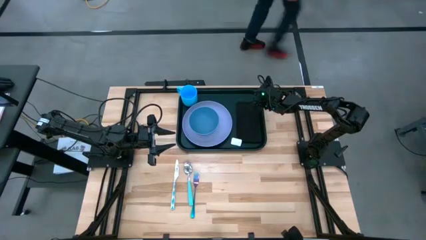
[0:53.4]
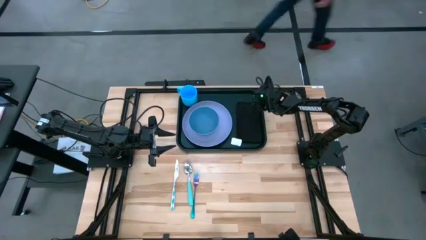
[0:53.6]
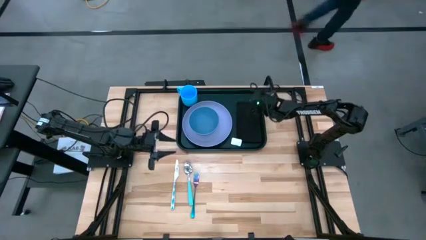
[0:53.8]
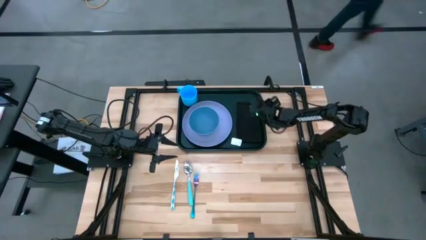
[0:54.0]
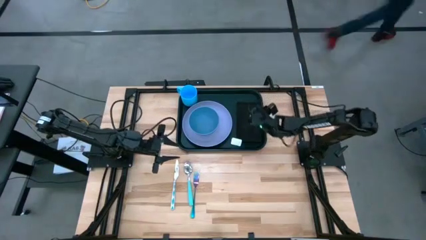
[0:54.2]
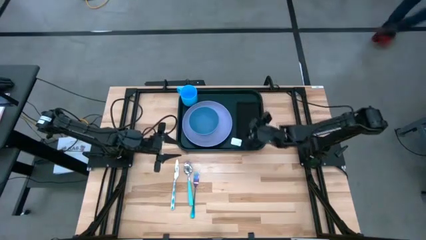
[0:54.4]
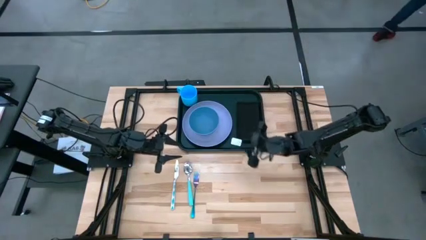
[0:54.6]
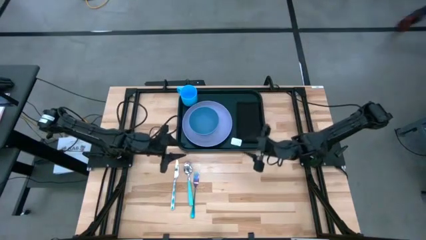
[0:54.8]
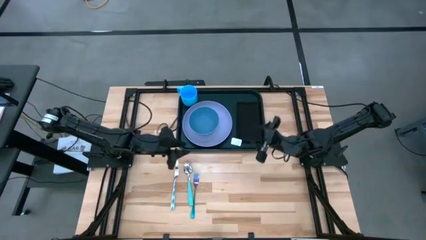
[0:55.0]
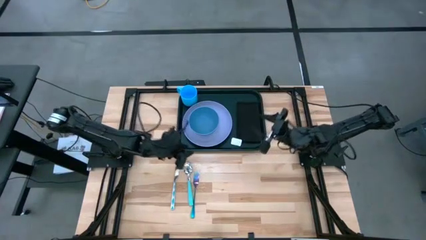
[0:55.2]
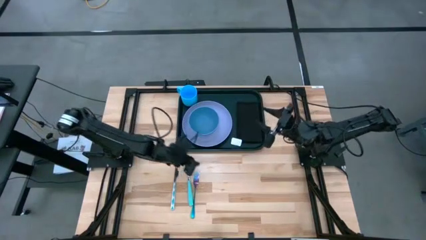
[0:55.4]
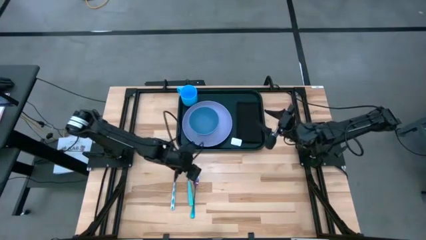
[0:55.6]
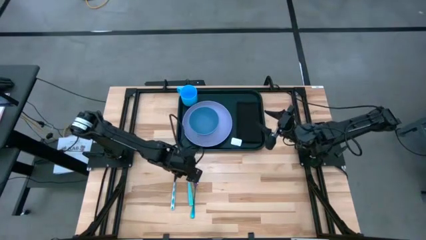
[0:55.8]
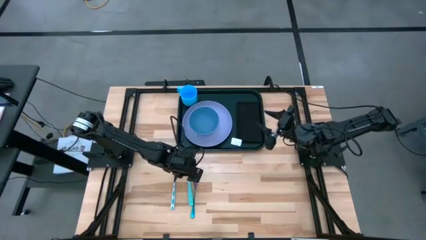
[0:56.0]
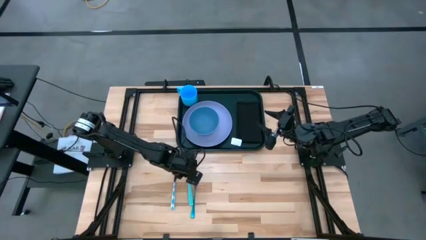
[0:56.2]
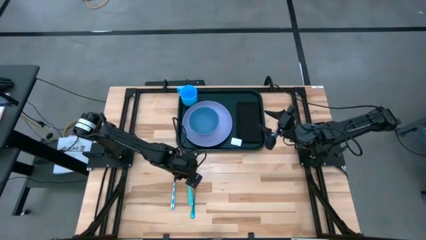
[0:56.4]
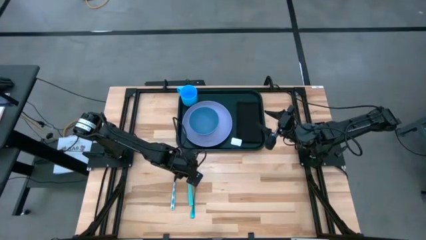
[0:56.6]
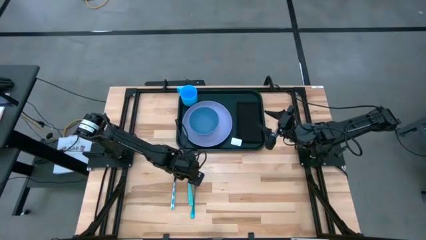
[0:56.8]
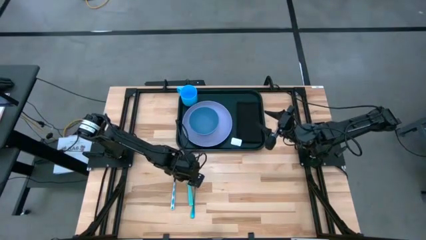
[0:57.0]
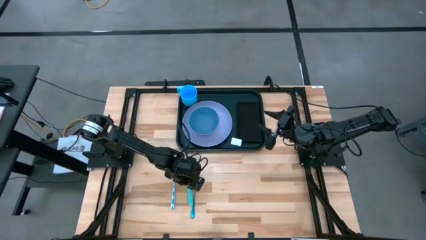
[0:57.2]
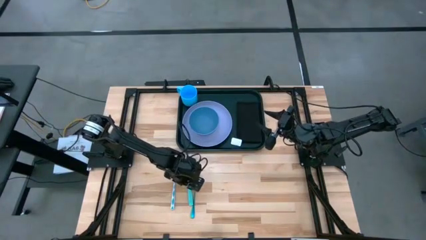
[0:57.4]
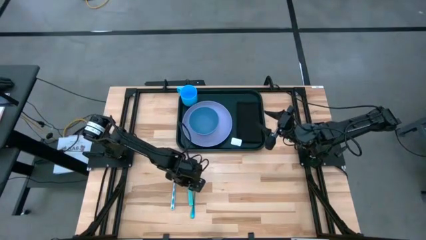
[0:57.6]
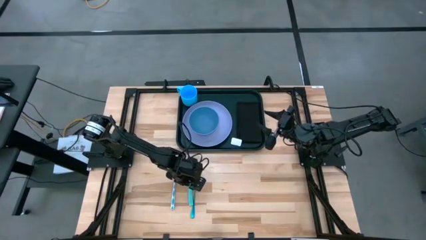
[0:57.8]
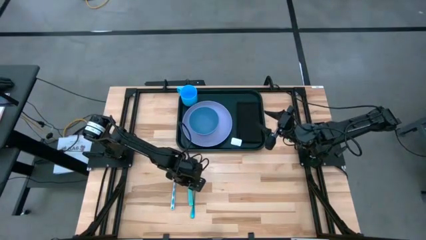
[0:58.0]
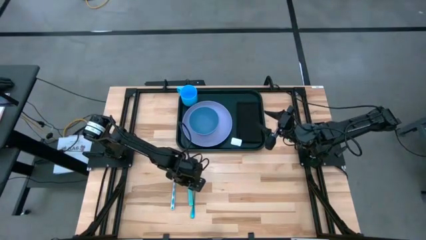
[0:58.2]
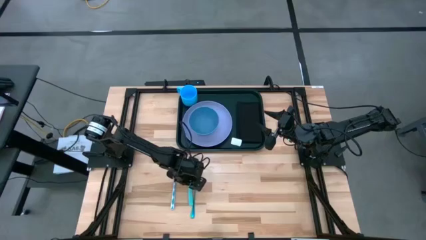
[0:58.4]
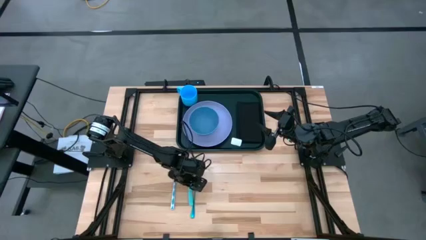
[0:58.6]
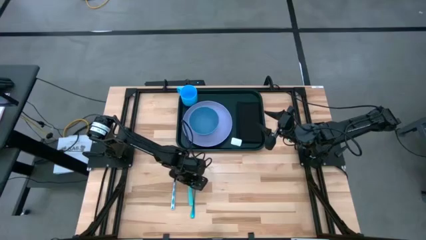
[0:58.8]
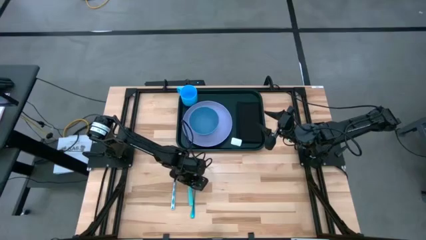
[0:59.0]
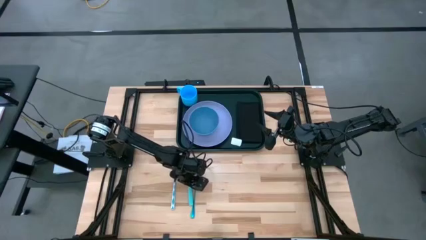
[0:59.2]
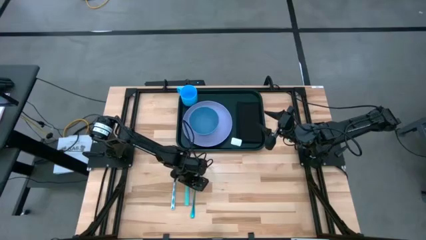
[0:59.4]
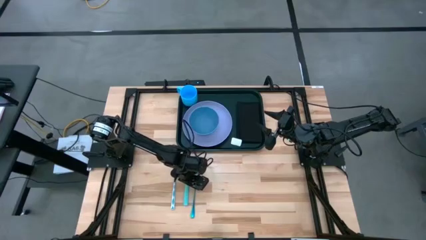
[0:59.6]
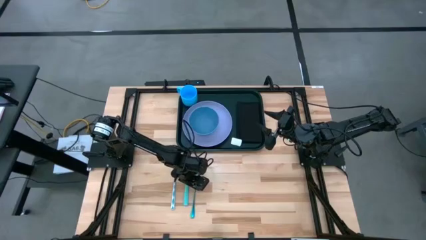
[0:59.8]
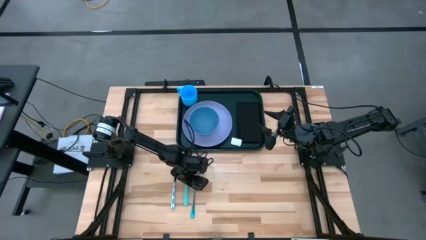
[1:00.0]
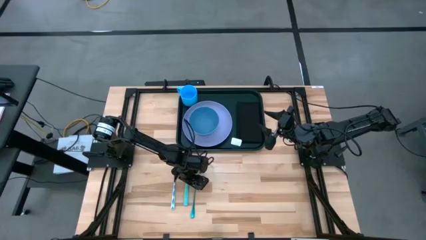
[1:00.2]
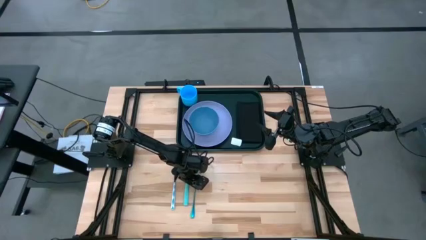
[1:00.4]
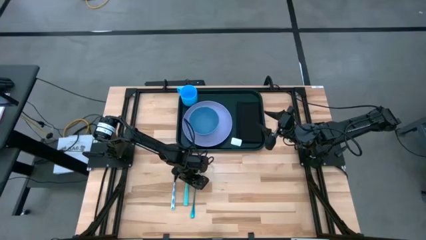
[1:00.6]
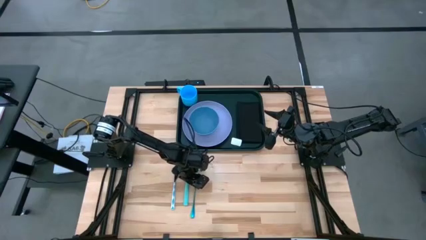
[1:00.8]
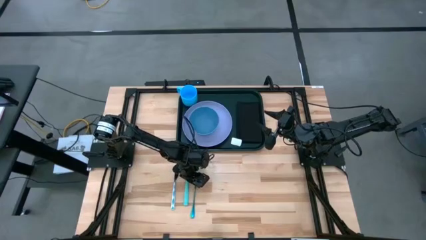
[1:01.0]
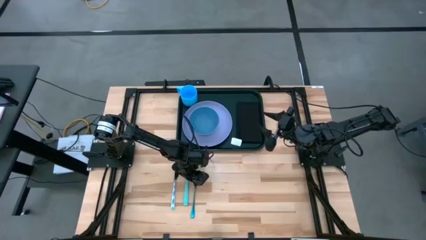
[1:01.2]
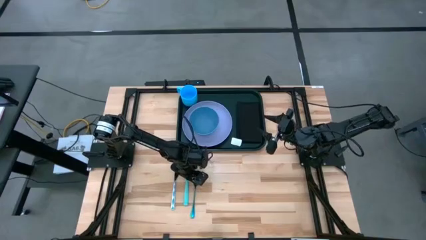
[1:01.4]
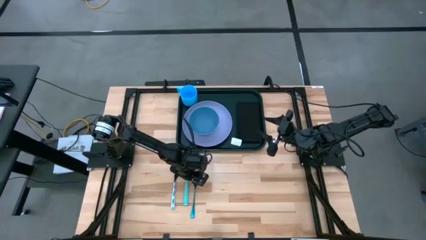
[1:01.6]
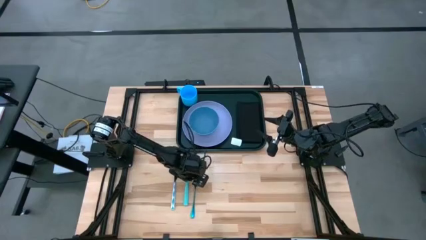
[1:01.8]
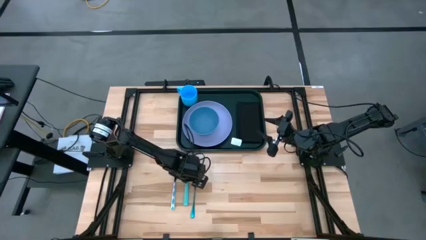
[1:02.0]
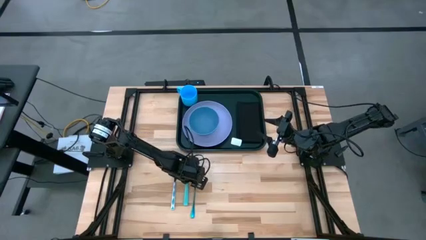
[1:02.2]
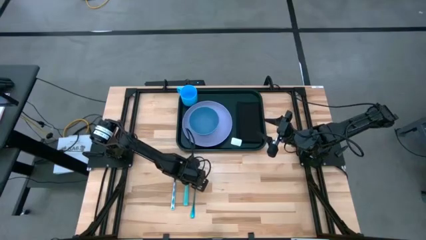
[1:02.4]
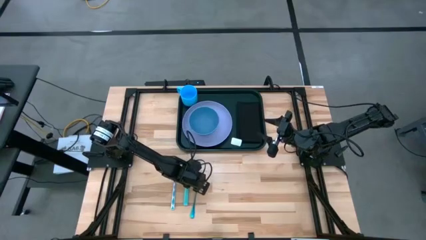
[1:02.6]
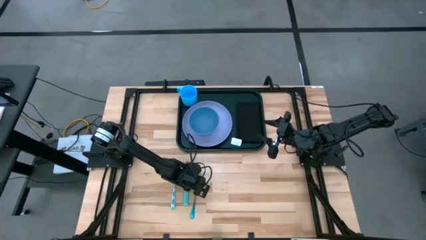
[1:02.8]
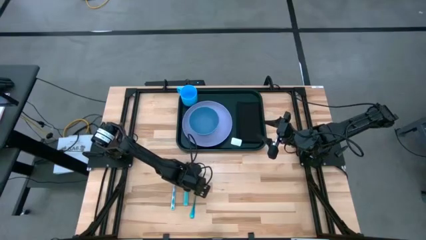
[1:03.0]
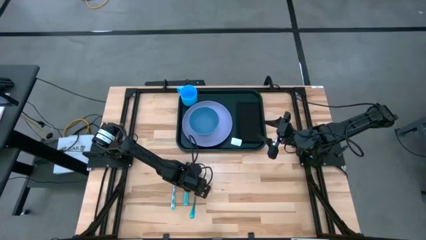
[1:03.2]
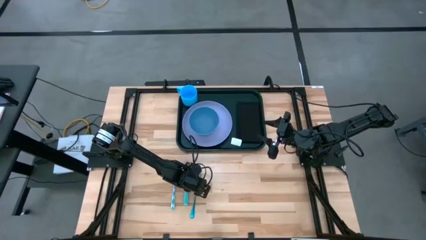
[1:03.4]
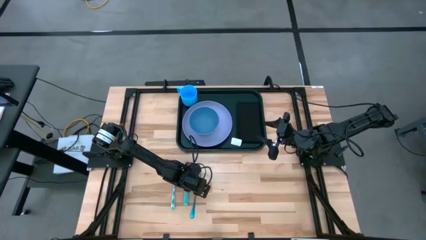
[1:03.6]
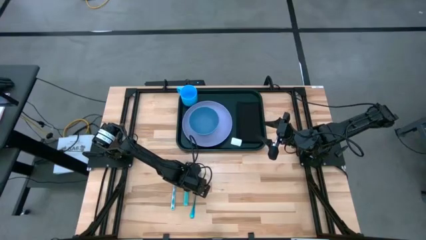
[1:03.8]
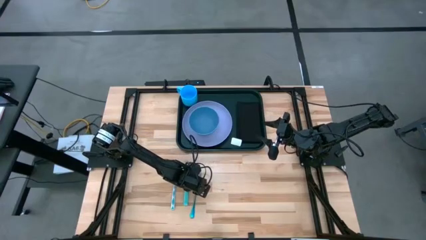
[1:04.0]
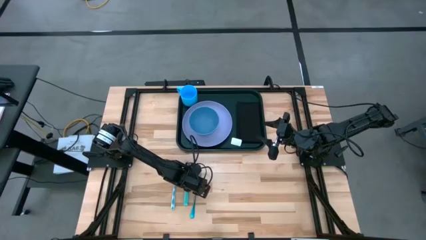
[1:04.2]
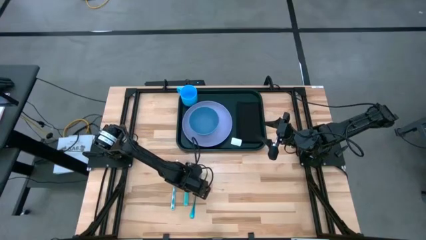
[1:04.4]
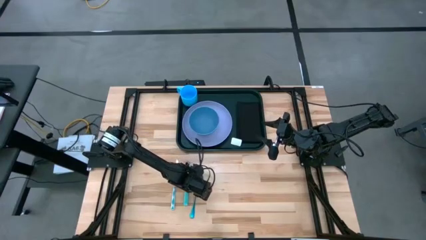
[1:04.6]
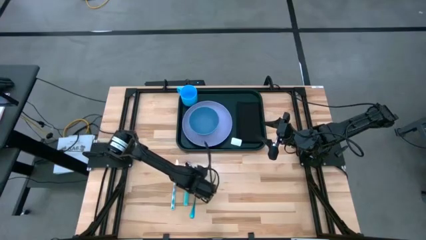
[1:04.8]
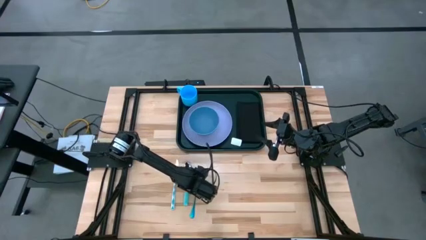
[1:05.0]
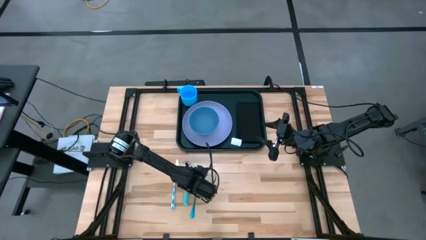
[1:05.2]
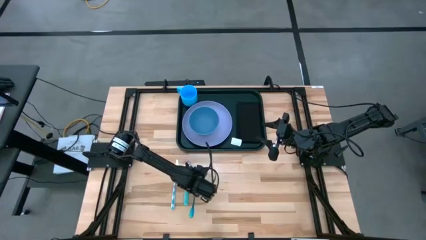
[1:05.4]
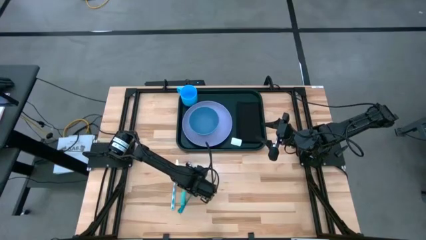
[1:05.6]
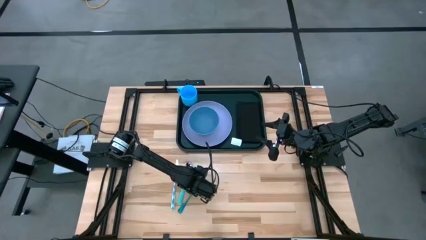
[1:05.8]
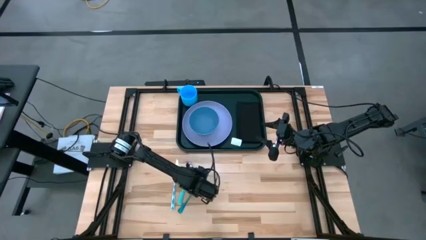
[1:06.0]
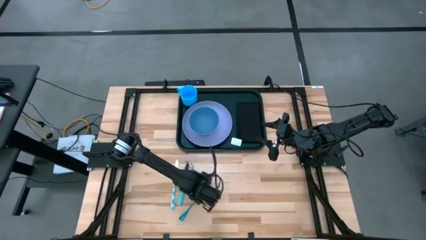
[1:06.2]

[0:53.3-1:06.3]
Task: Set up tray
Put the blue fork on top of the black napkin on the black tray

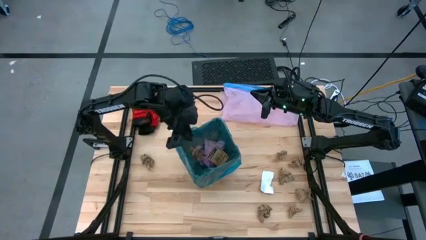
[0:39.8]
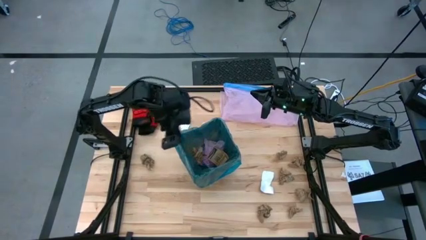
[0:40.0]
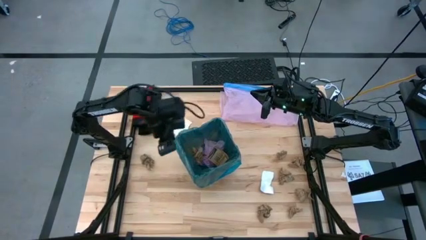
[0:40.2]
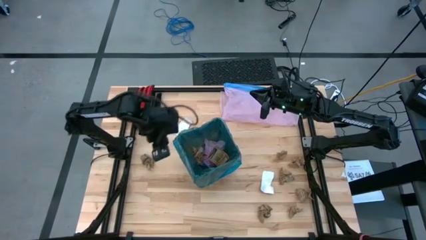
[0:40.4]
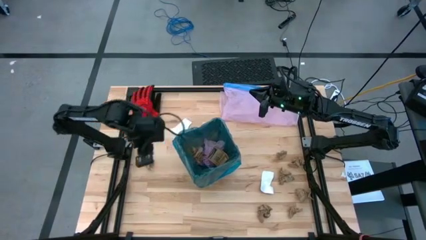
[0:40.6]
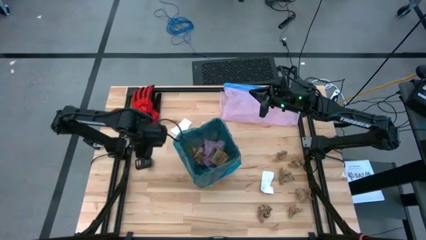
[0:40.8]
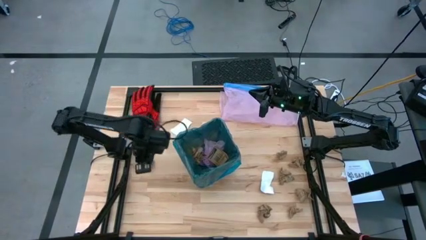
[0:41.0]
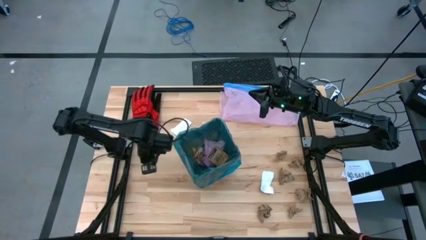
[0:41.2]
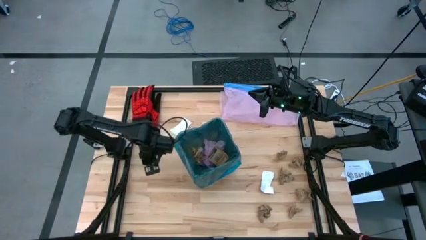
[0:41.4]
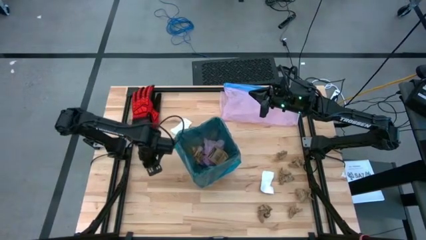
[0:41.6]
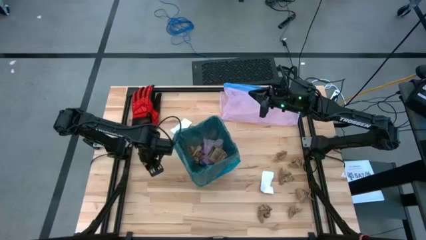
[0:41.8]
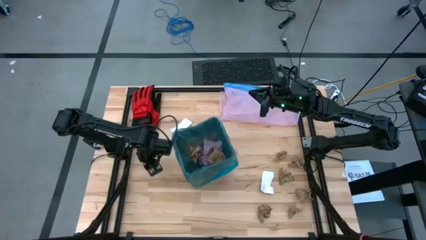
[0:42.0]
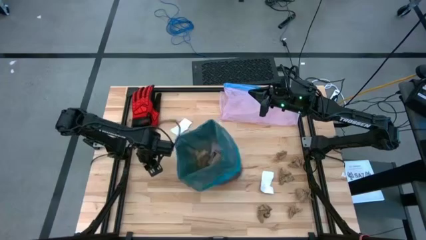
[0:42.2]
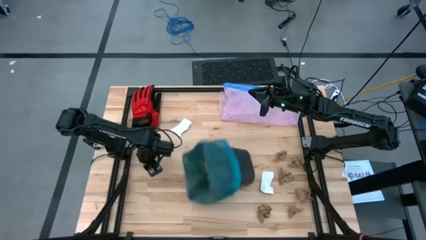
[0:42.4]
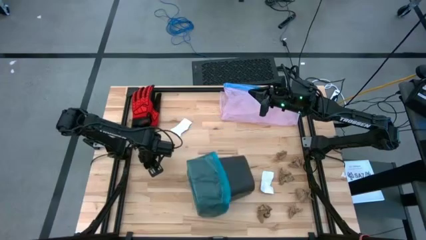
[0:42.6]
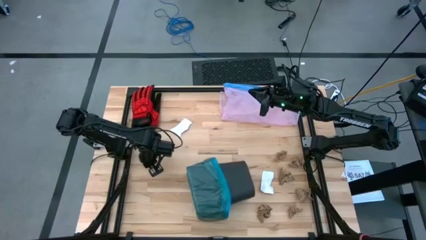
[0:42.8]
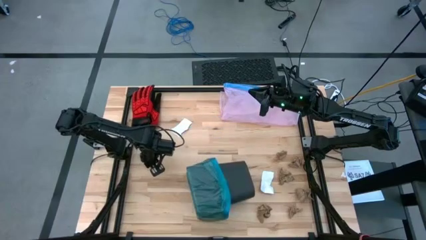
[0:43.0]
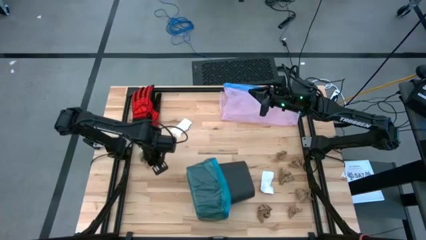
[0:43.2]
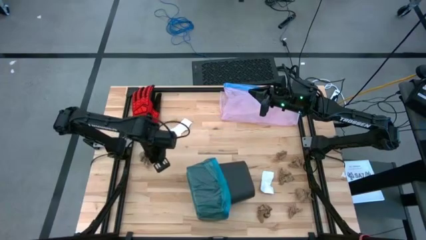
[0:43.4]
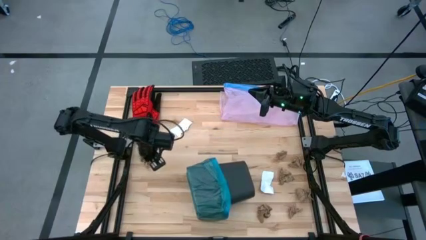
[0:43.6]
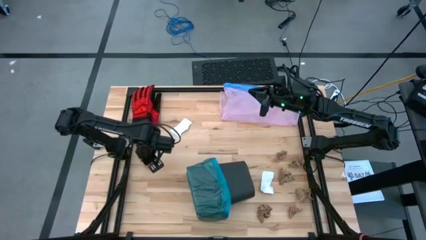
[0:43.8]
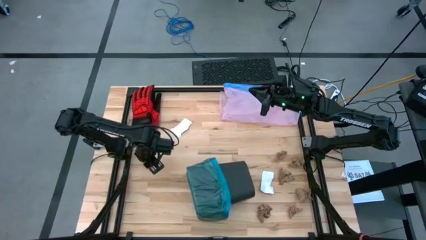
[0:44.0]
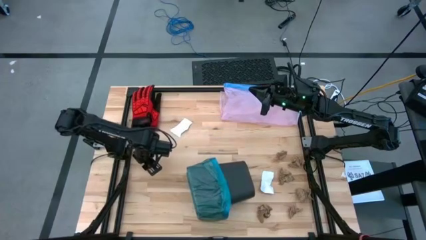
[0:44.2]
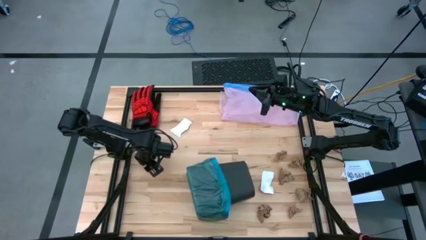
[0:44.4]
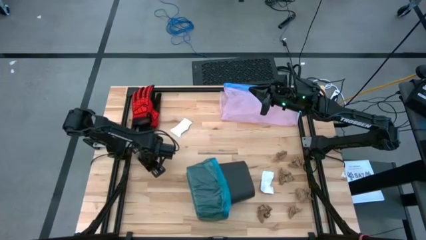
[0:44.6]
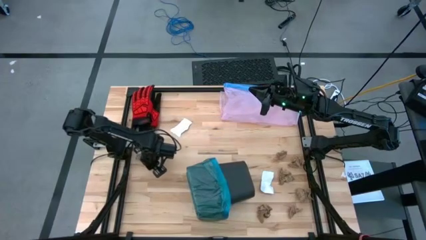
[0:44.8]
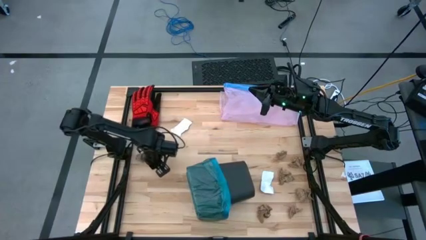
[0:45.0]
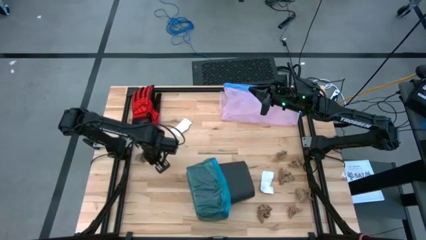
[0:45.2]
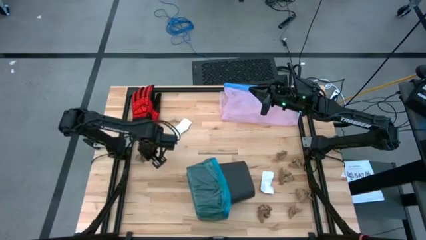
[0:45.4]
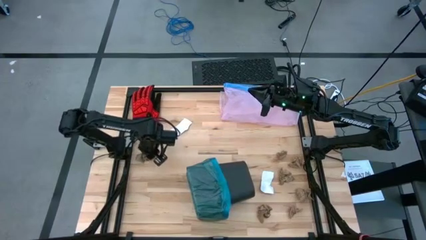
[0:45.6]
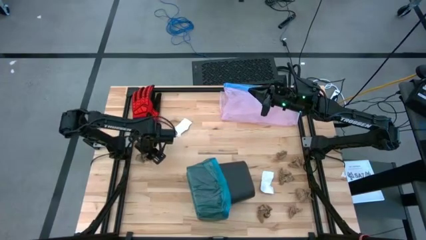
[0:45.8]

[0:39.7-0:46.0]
Task: place trash/remove bag and relplace
Put the brown napkin into the black trash bin
